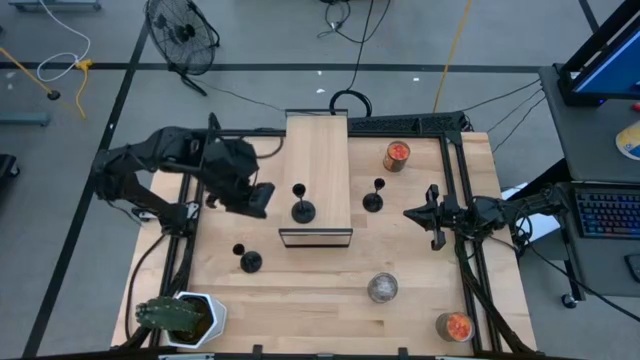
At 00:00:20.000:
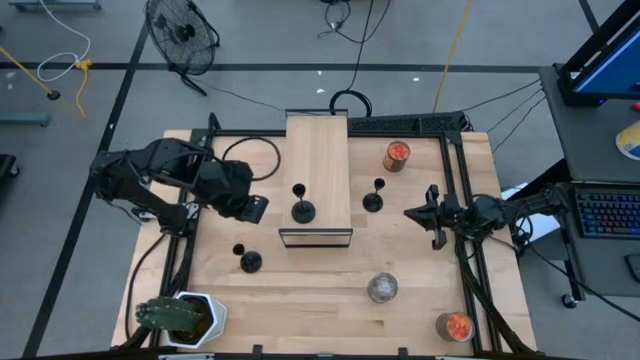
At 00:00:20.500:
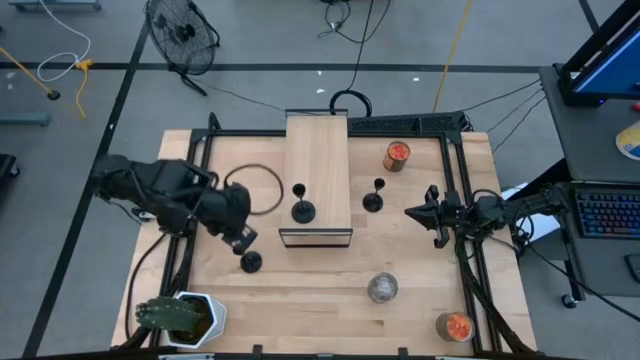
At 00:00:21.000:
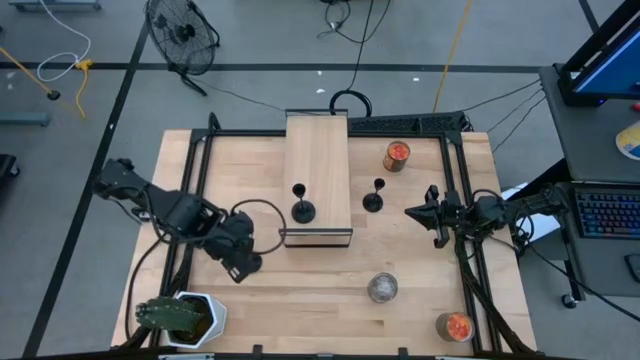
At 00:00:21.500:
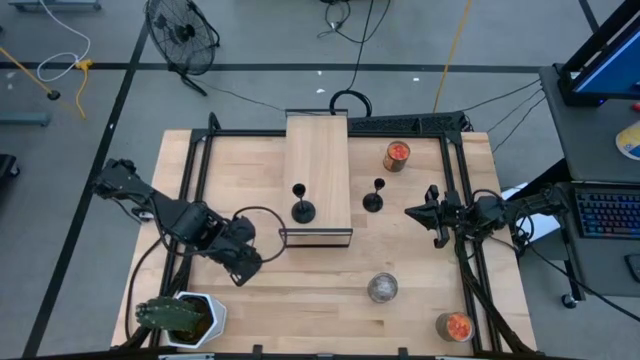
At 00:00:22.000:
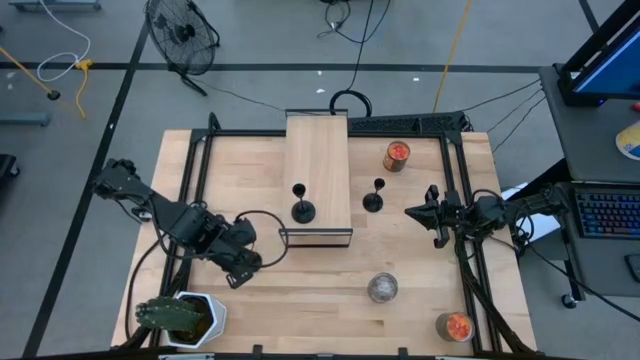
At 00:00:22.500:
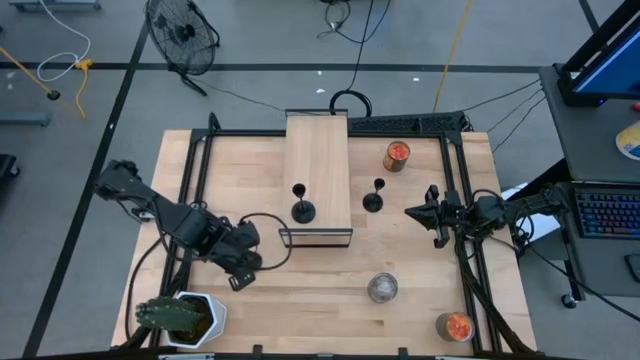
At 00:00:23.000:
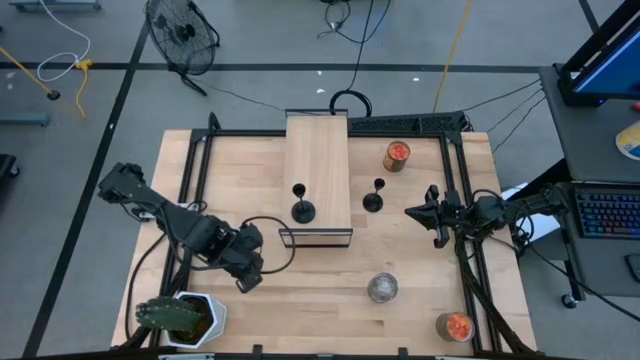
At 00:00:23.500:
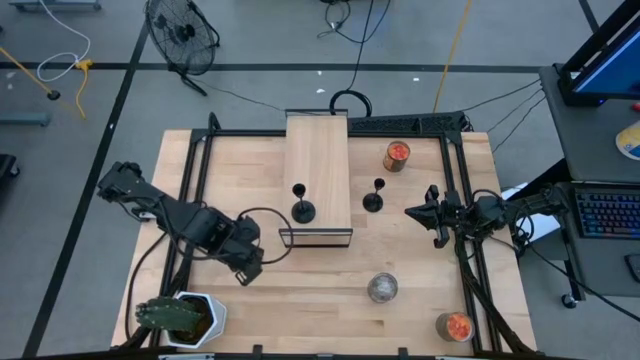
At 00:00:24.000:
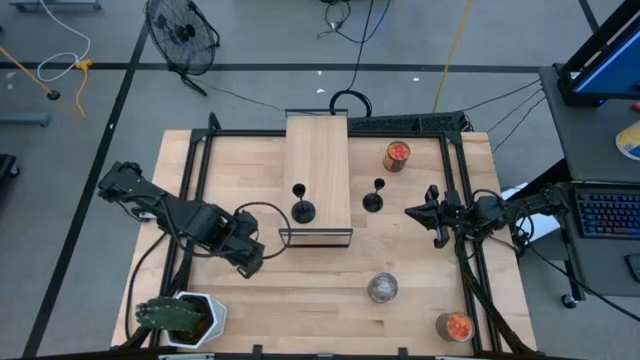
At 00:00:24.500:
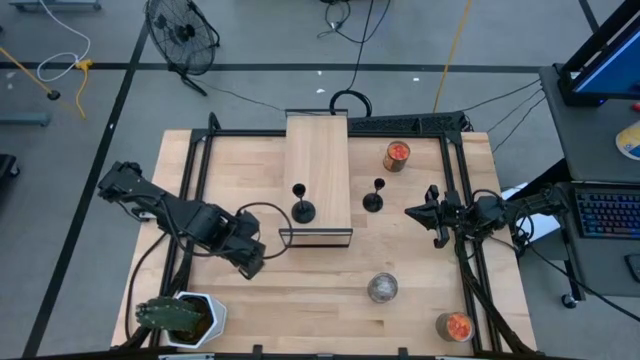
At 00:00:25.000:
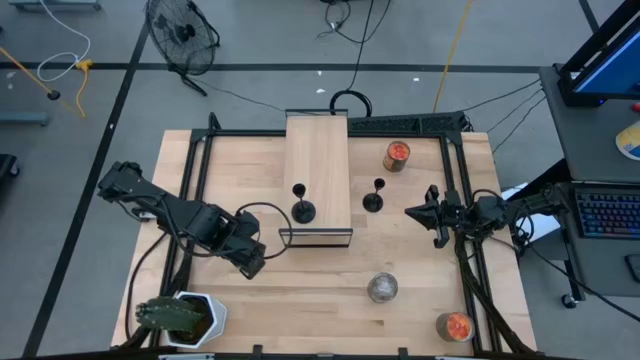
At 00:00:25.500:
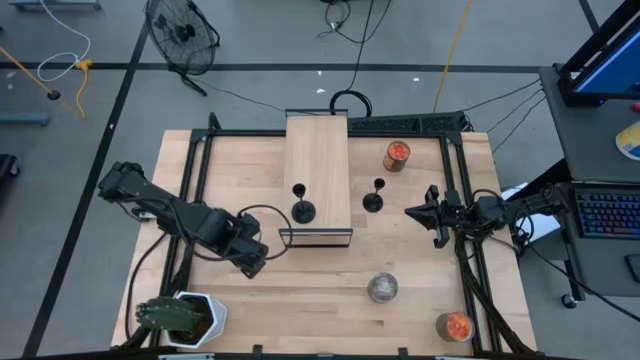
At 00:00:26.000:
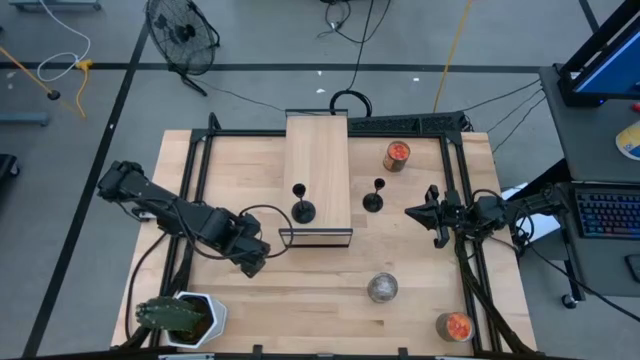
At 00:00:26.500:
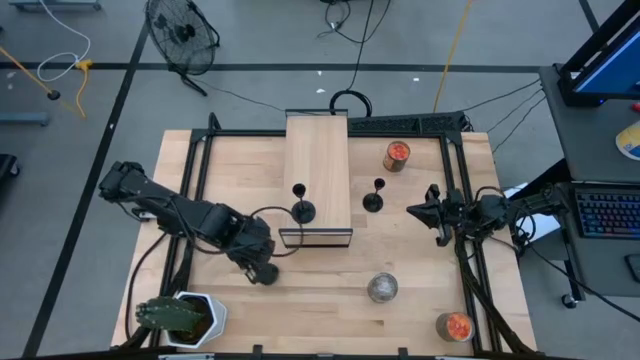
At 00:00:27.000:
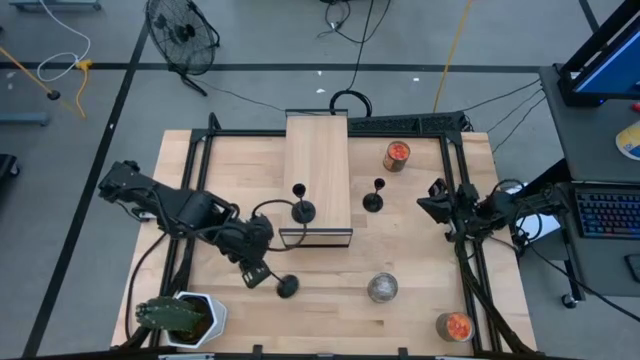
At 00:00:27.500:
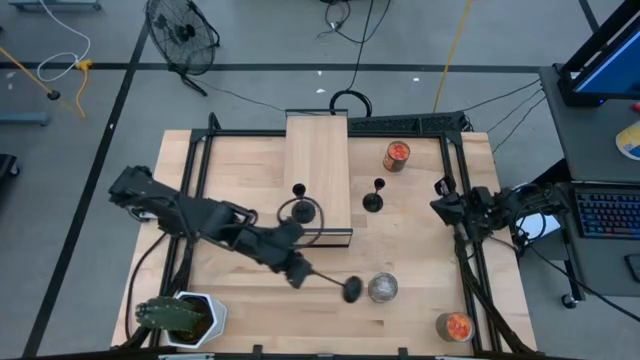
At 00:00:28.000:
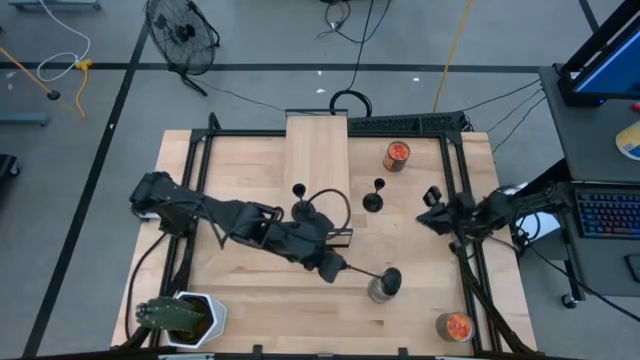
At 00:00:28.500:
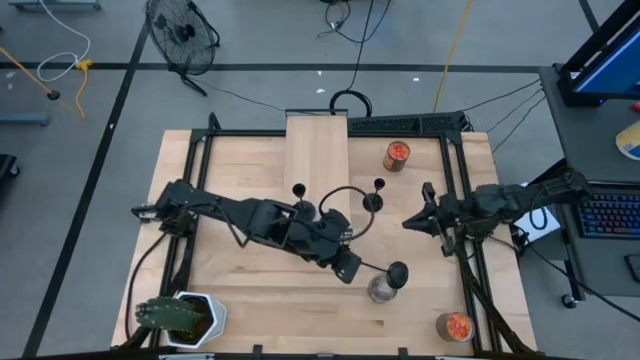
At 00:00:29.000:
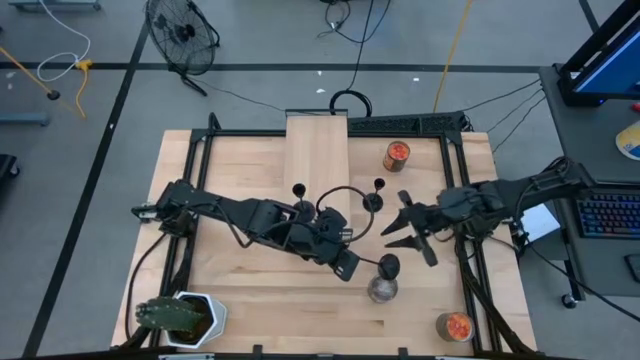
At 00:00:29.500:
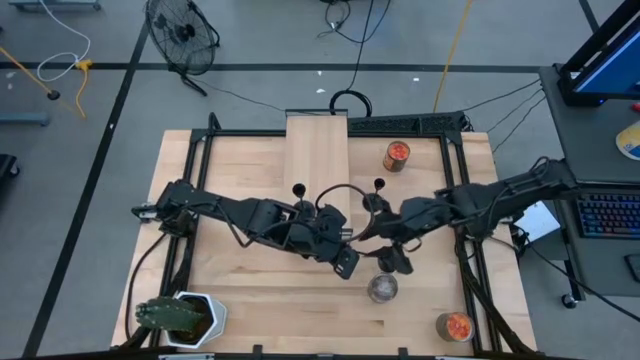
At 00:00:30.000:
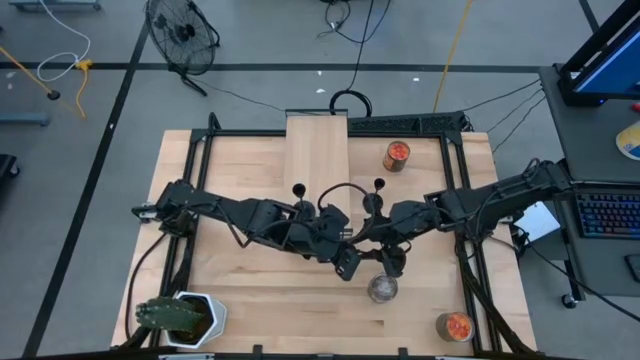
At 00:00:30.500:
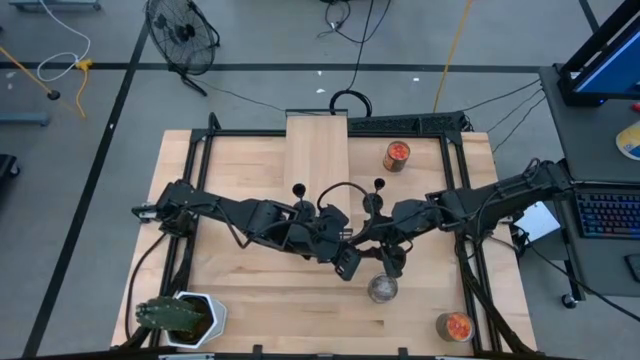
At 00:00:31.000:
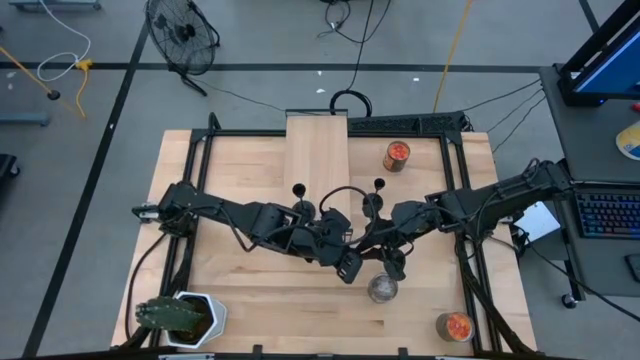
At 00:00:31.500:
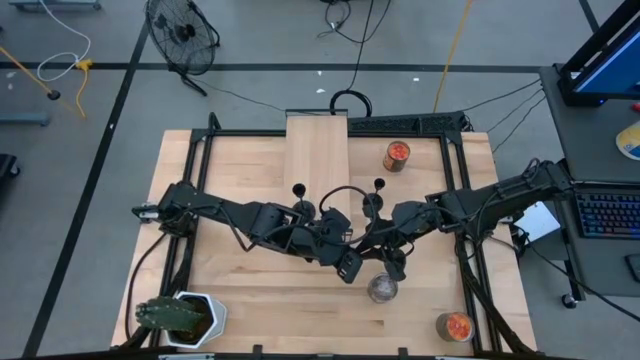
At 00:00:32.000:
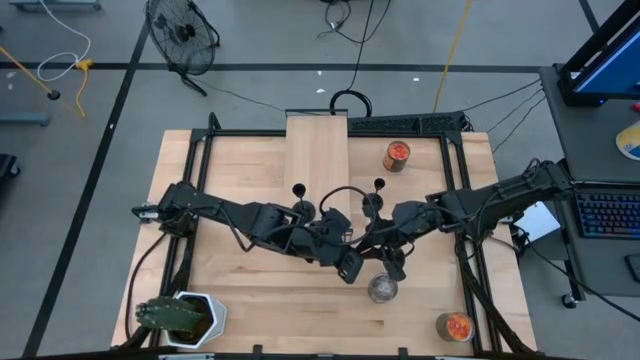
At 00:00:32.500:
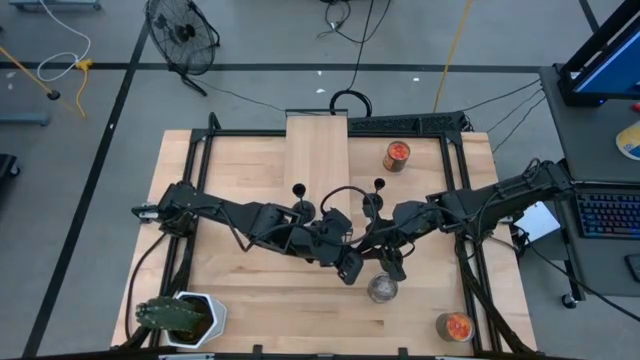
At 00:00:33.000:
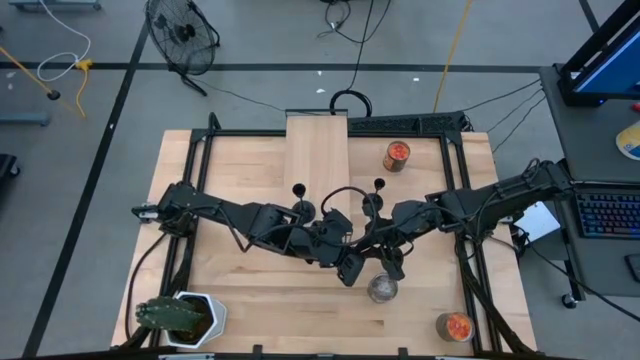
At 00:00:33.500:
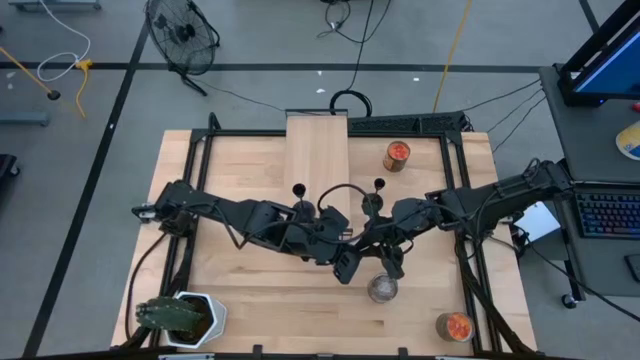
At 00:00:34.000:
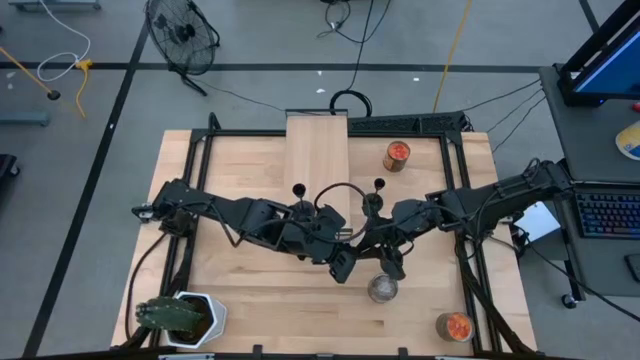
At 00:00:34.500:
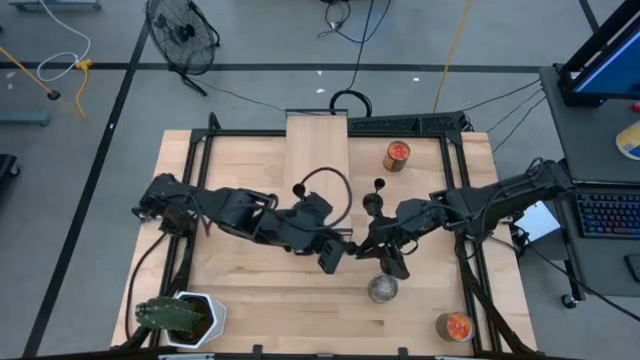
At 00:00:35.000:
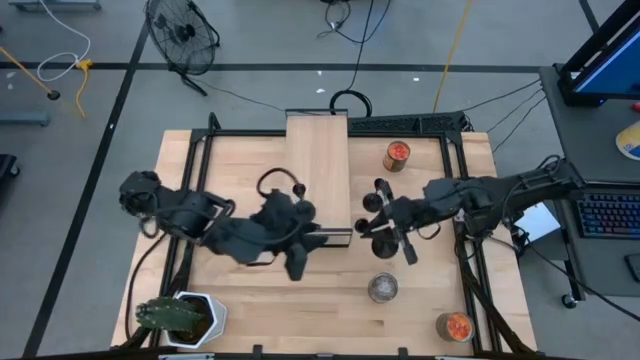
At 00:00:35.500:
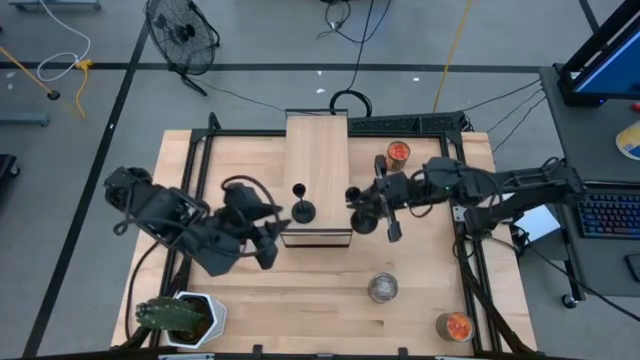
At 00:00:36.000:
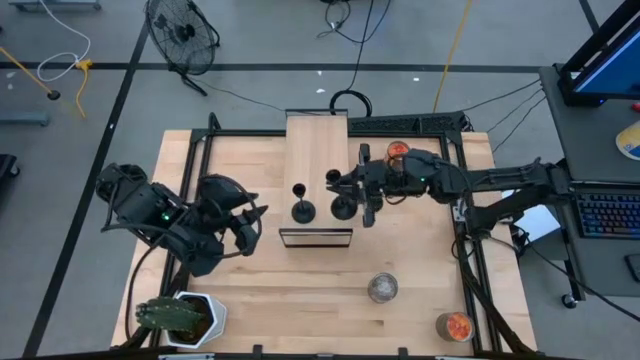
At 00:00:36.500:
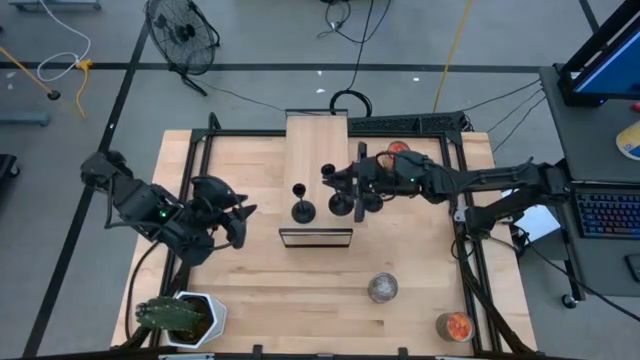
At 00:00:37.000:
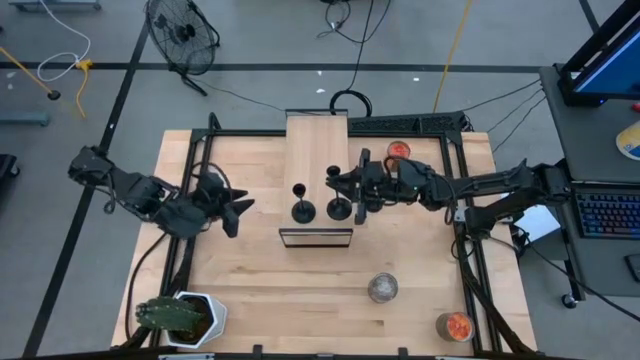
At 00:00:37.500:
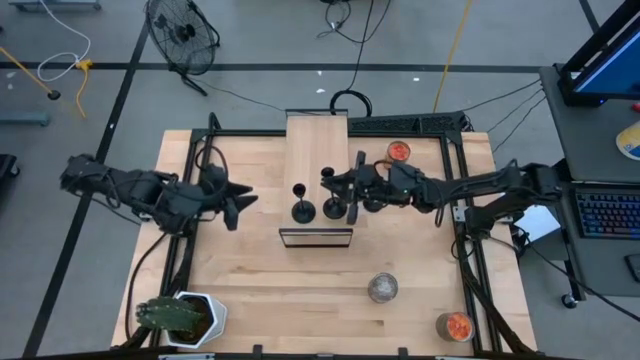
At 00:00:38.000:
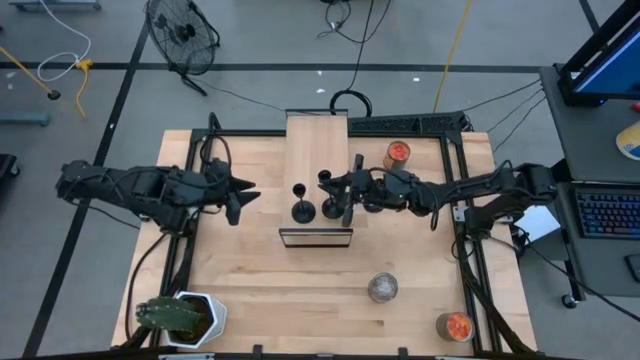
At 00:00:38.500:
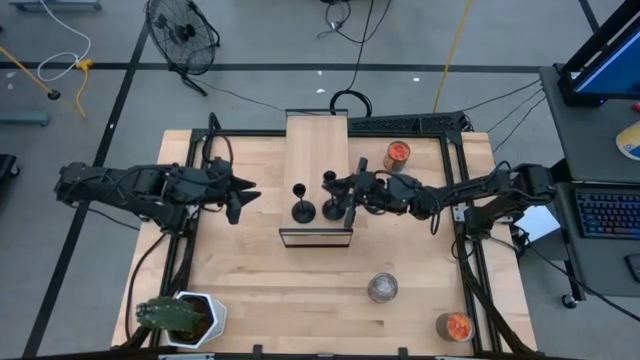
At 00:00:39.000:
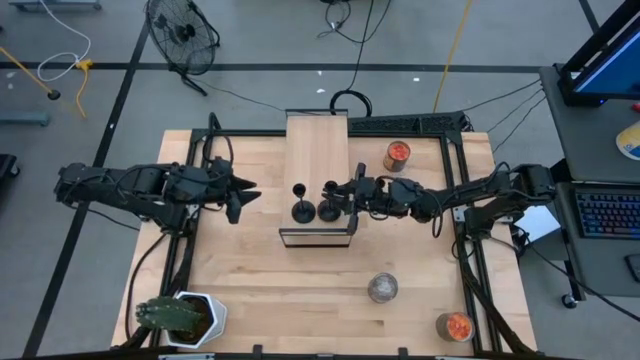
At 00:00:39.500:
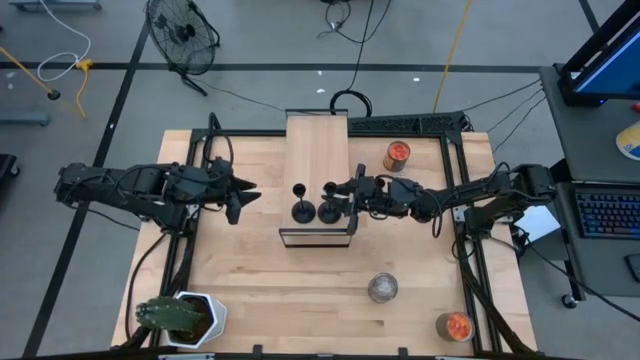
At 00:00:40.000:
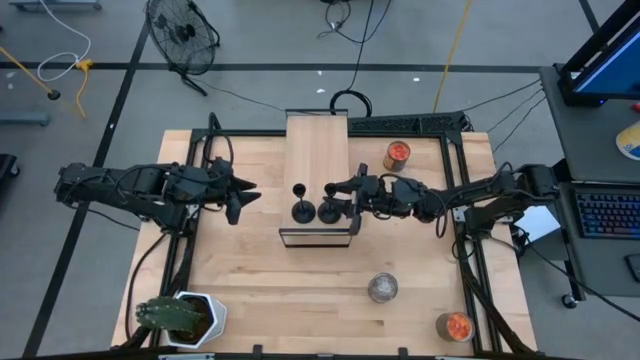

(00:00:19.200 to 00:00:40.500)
Task: Pick & Place candle stick holders
Put the bottom black candle holder on the shelf
